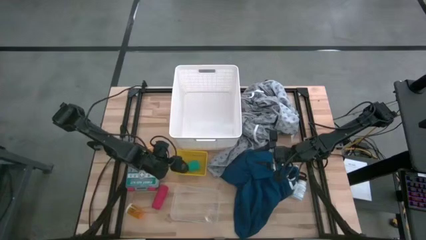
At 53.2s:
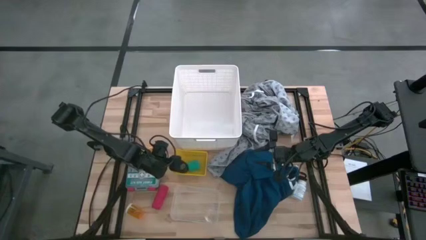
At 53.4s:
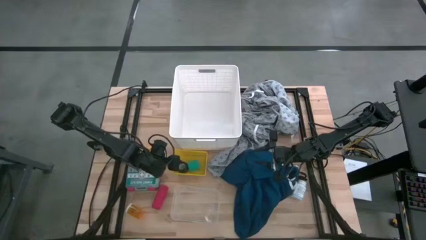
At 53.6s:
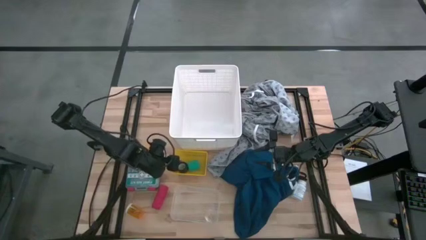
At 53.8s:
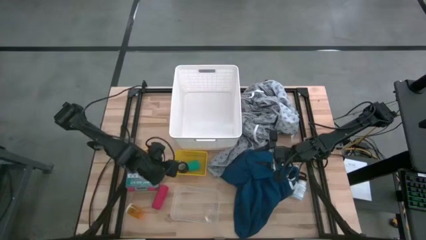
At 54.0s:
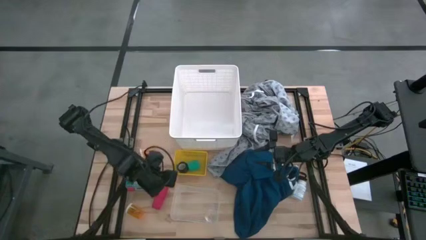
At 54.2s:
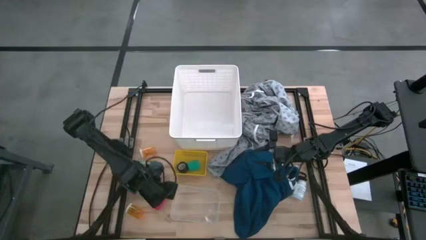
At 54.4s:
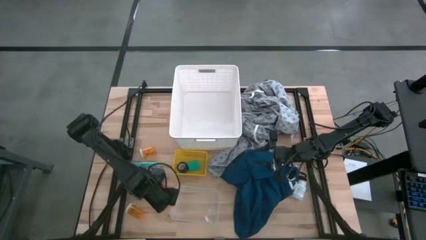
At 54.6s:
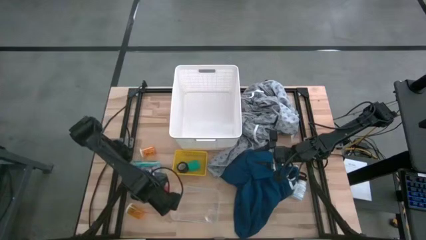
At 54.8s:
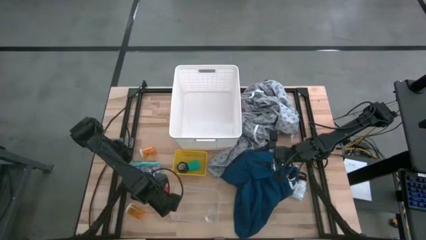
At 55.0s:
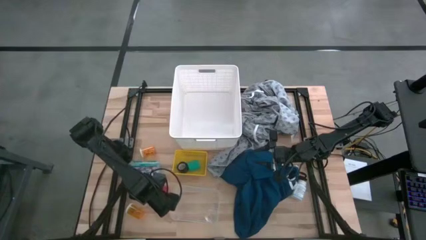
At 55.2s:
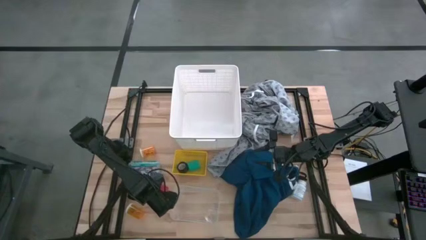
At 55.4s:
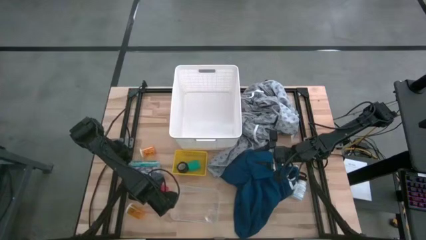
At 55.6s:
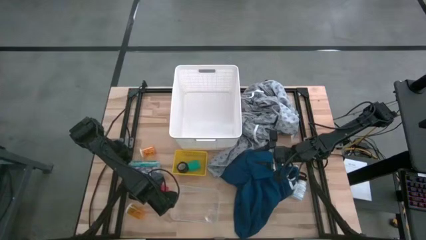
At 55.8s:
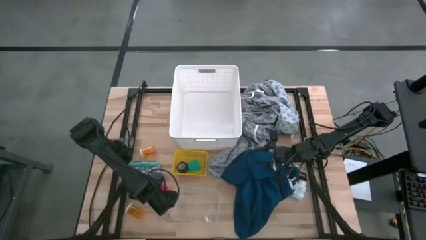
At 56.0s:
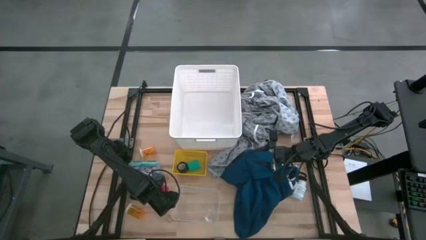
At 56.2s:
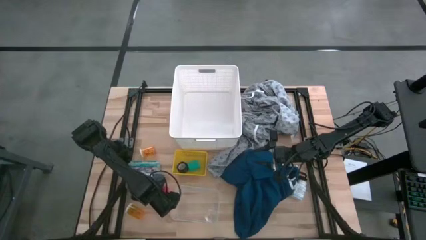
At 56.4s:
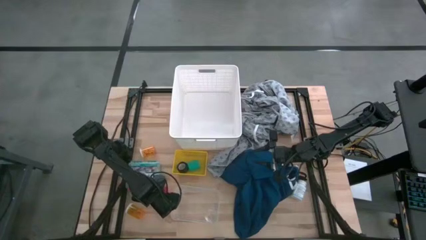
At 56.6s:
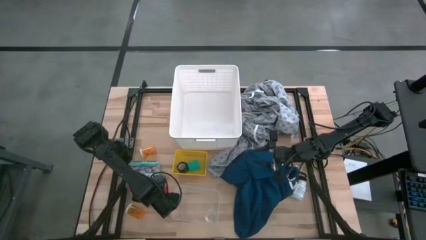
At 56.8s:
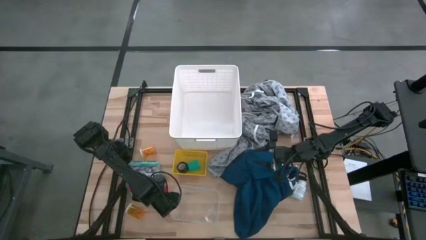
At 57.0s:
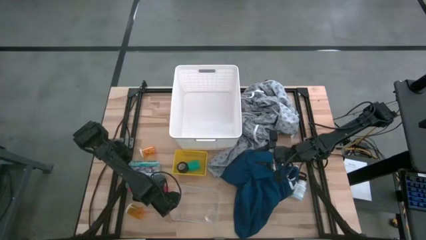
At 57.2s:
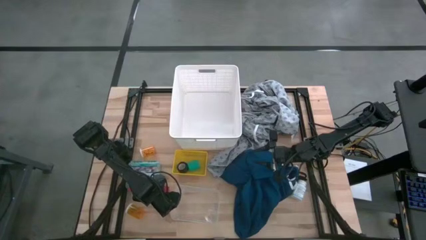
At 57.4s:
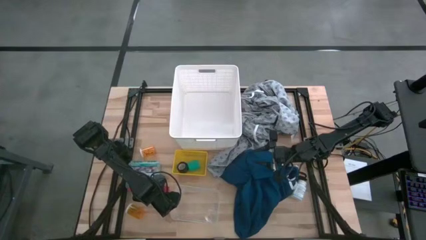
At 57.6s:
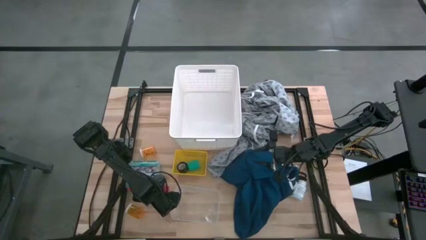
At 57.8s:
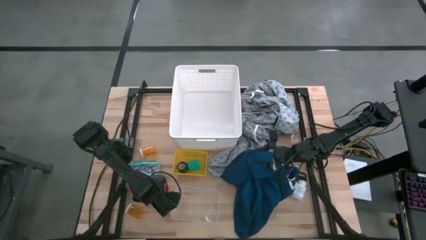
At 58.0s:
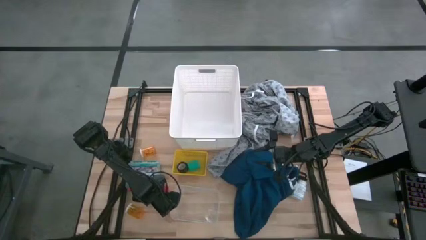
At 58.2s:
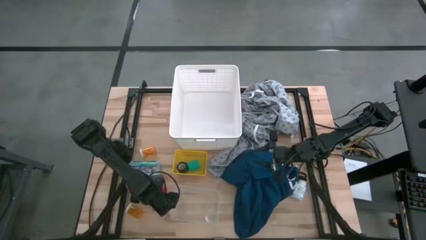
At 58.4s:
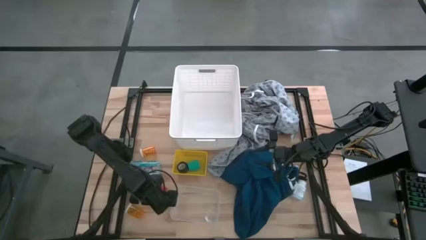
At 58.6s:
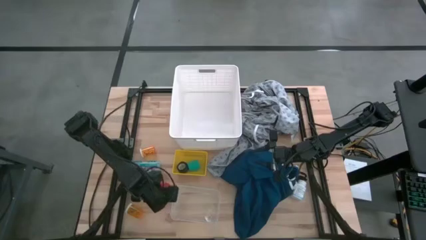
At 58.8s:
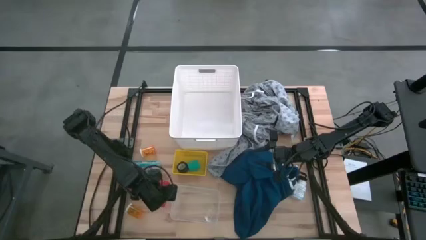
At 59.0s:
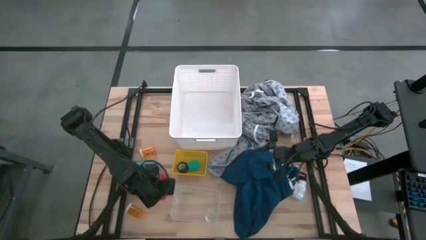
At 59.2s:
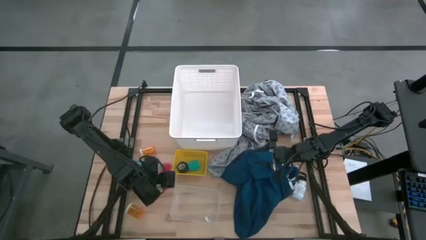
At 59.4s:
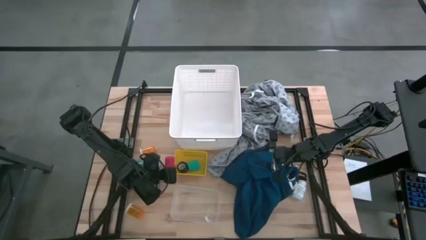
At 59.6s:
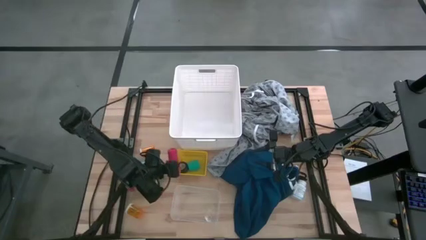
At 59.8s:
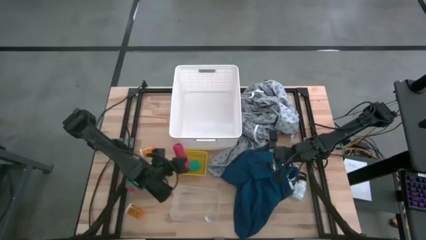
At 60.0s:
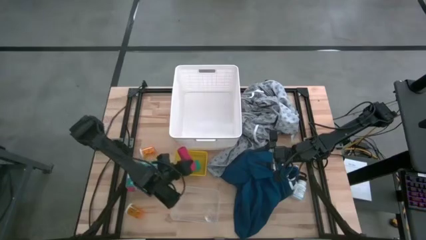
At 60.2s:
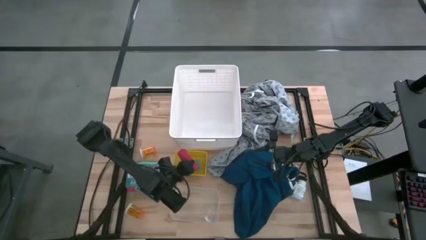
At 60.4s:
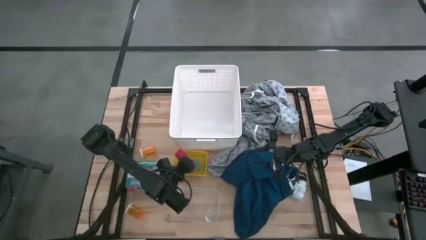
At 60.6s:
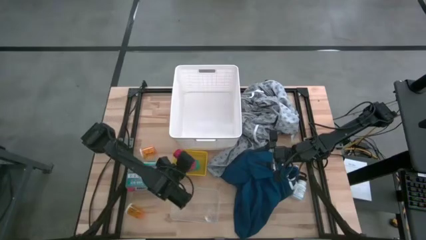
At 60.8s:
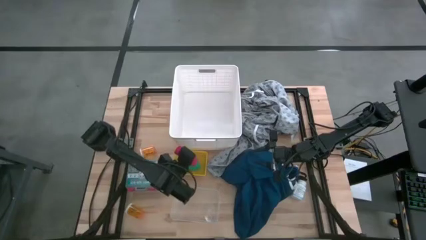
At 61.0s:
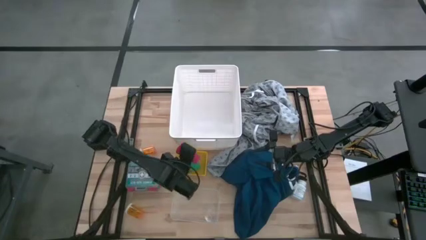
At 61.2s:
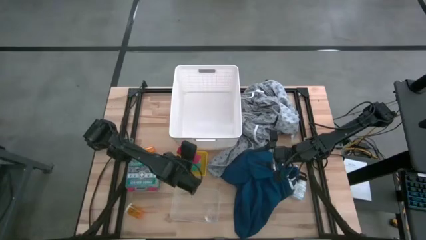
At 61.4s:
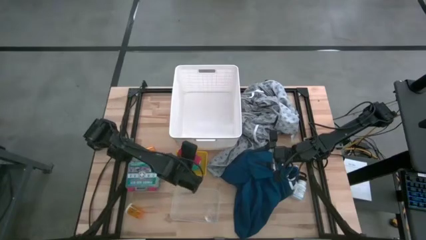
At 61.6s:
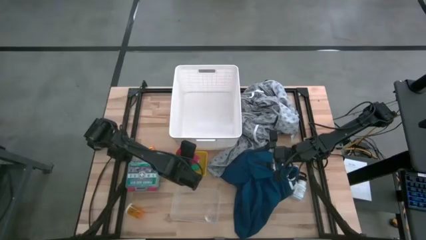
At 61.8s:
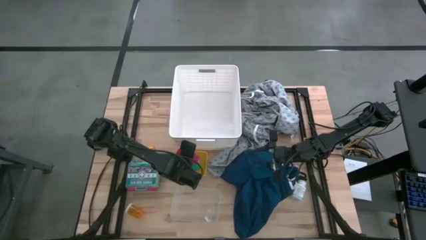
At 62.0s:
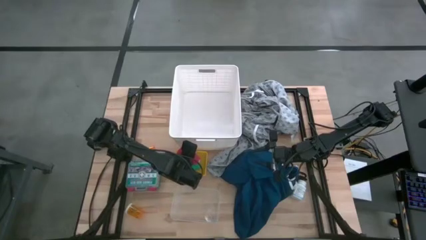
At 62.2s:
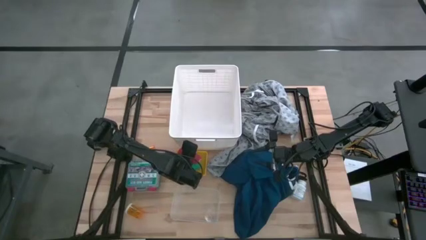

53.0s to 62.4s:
Task: Pick & Place Medicine items
Put the red bandage into the yellow bin

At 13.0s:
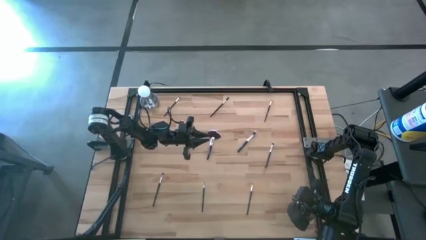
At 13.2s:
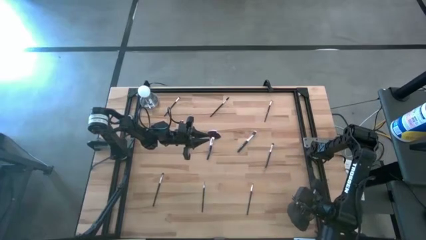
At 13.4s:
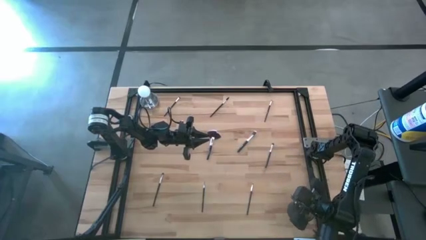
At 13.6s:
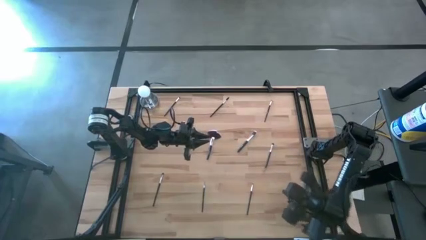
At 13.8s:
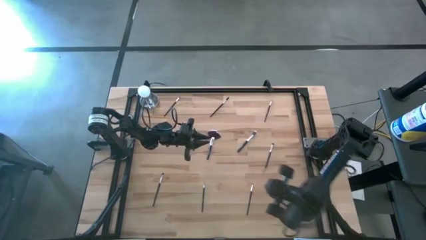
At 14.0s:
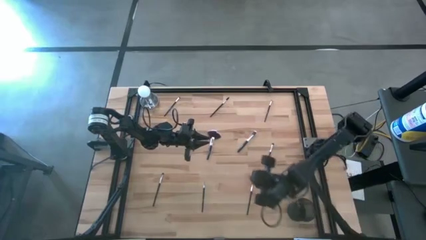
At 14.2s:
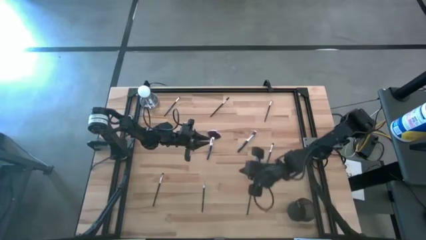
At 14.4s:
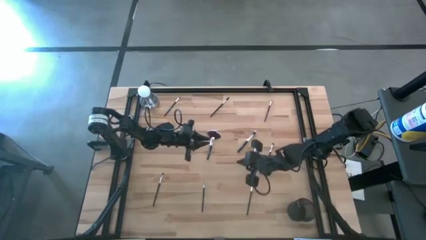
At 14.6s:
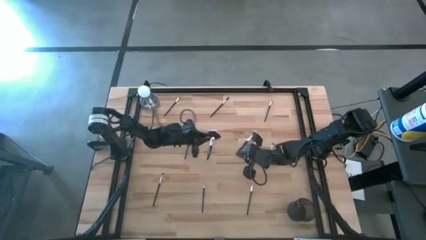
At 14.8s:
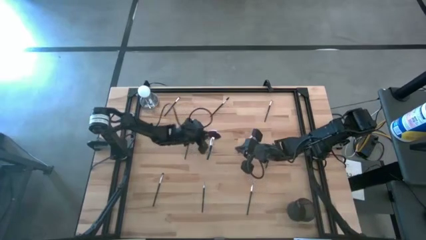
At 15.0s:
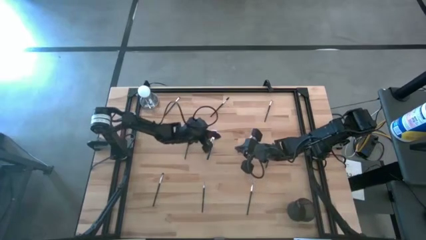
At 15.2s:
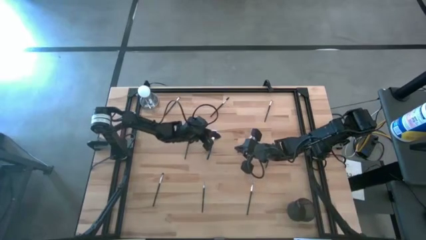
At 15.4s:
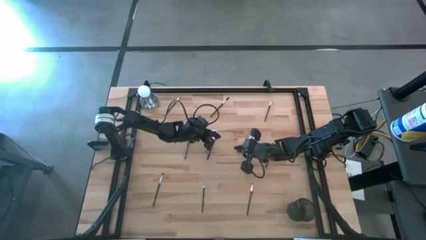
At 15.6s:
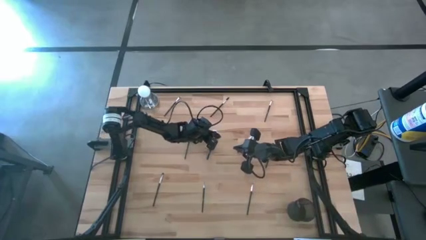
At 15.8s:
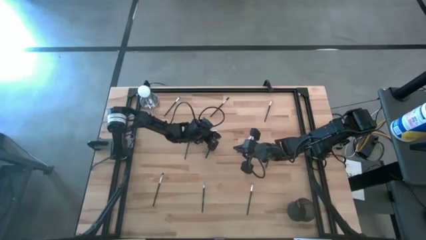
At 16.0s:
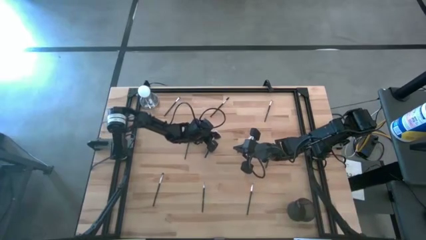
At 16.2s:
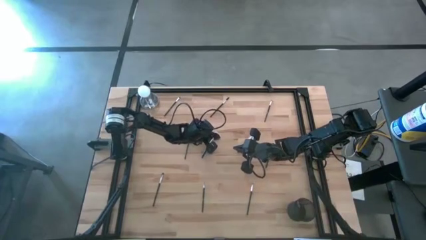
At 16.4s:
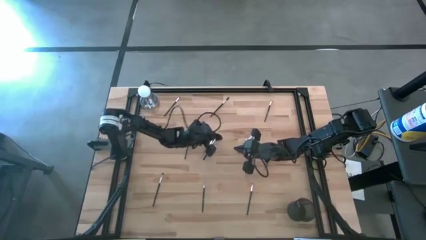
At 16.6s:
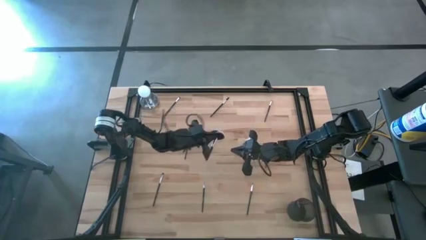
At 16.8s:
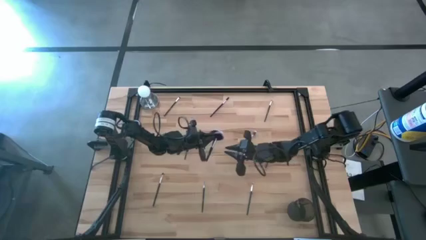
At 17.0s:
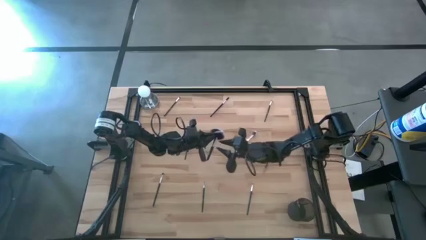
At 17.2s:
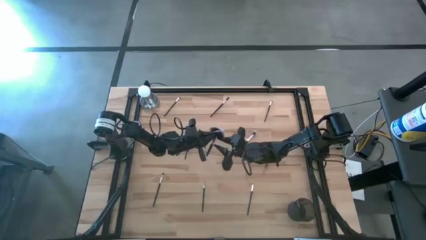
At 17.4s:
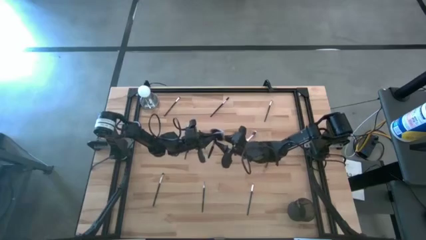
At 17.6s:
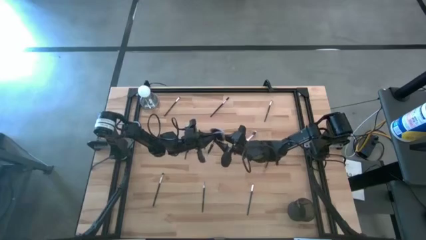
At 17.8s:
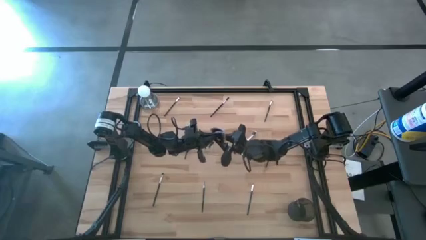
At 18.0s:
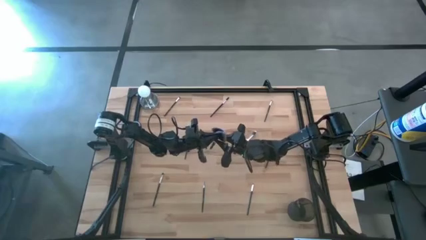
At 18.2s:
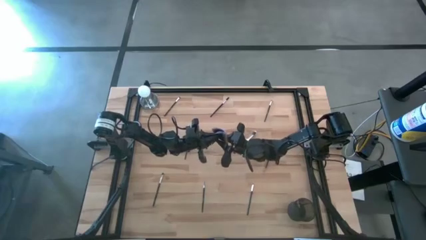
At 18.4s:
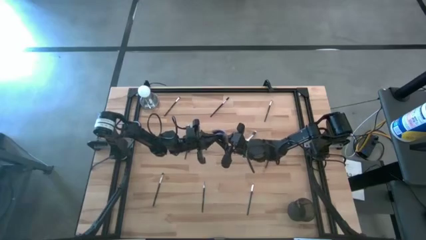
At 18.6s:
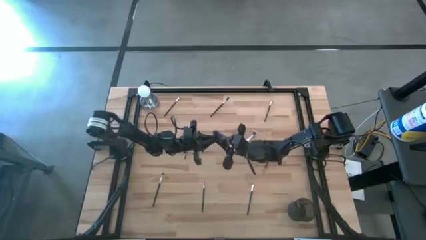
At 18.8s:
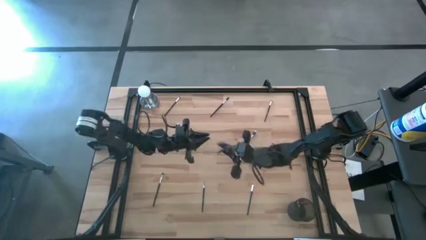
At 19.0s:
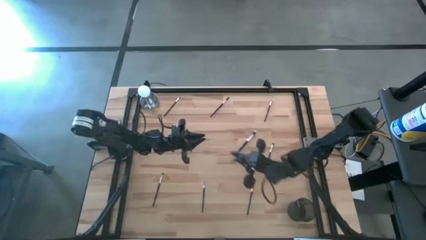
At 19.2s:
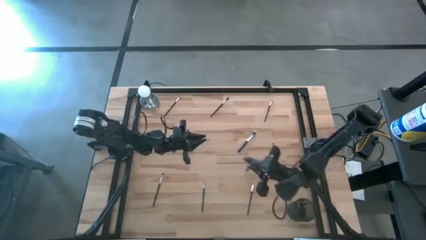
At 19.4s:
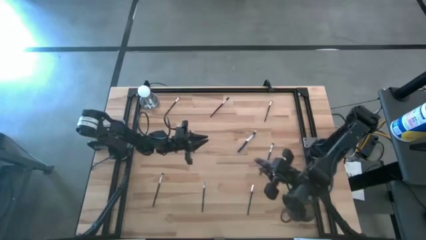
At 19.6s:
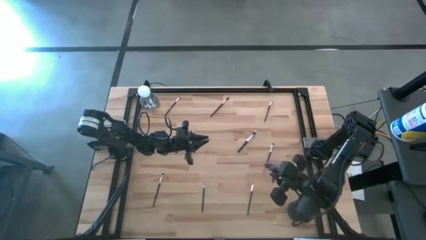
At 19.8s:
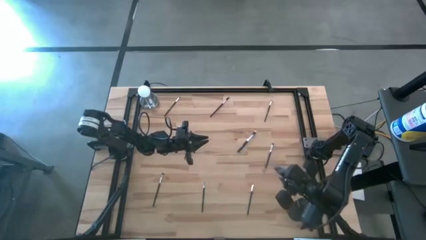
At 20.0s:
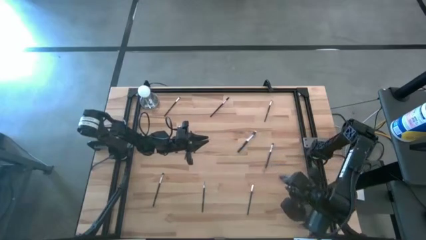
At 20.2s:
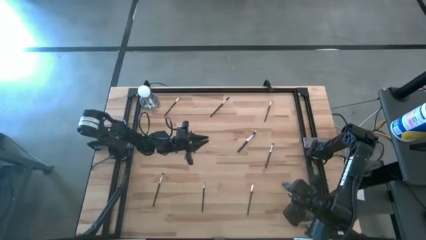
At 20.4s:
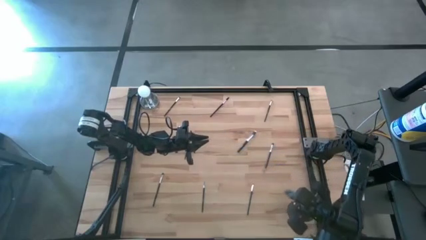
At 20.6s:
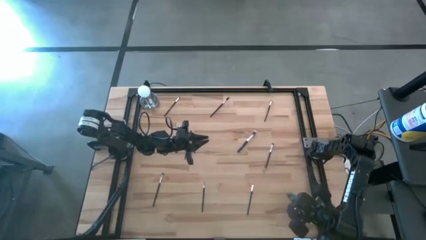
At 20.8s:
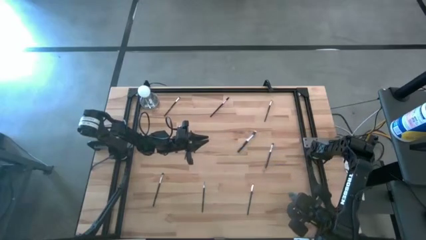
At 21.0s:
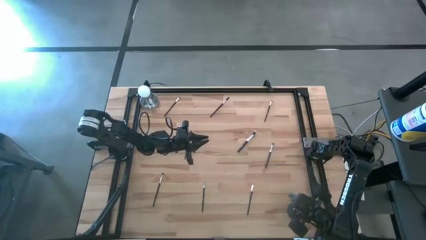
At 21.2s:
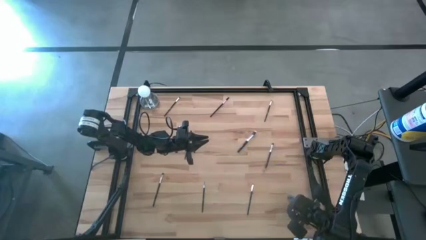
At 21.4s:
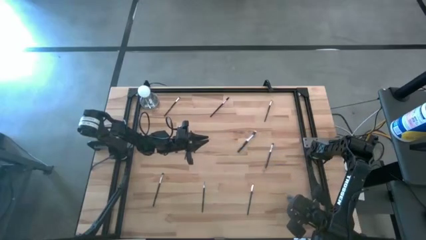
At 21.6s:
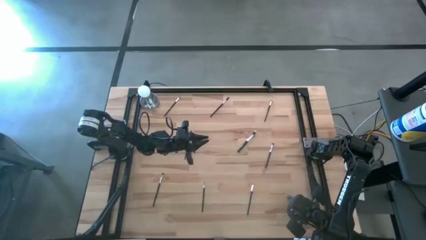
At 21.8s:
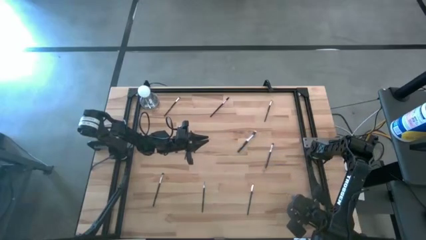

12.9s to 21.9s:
Task: Pick & Place Makeup Brushes
Put the black highlighter brush into the makeup holder
